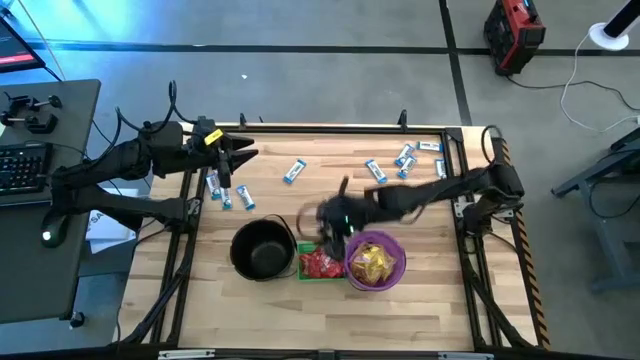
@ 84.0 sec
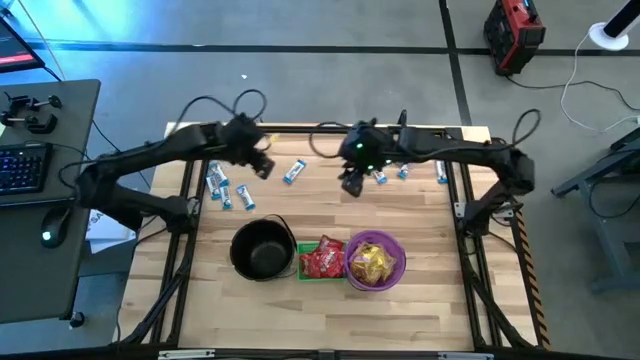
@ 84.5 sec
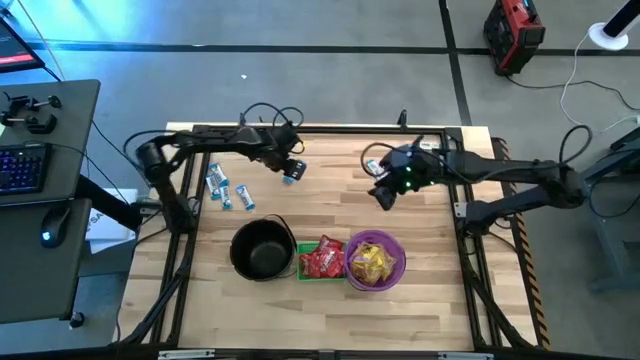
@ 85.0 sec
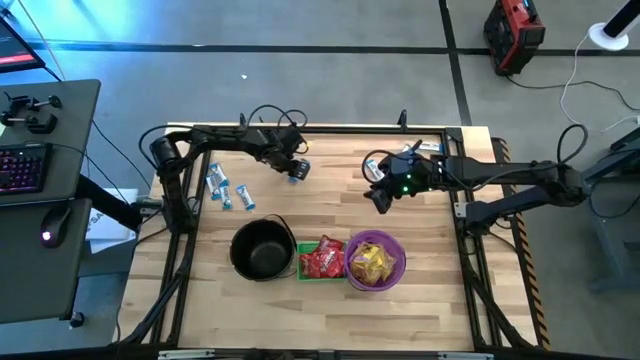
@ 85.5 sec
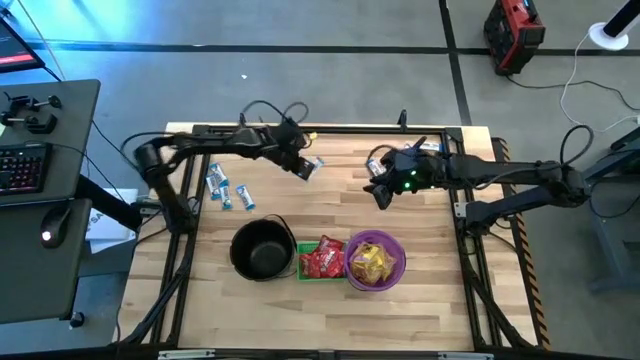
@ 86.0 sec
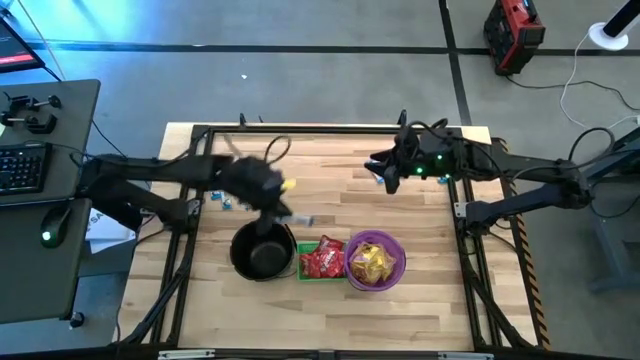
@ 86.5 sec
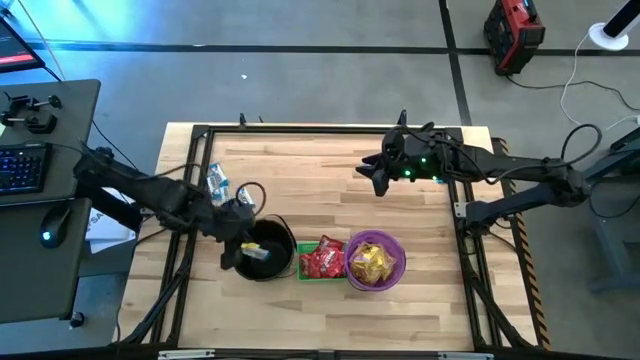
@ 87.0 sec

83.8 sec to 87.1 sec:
Task: Sort candy by brand, put in halloween buckets
Put the white chocolate into the black bucket

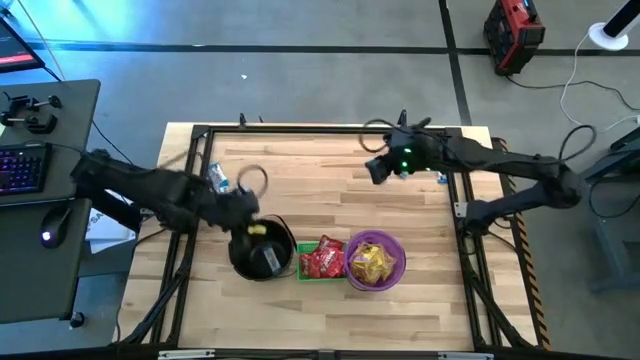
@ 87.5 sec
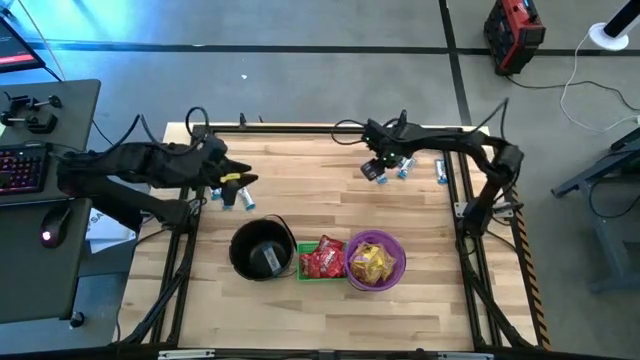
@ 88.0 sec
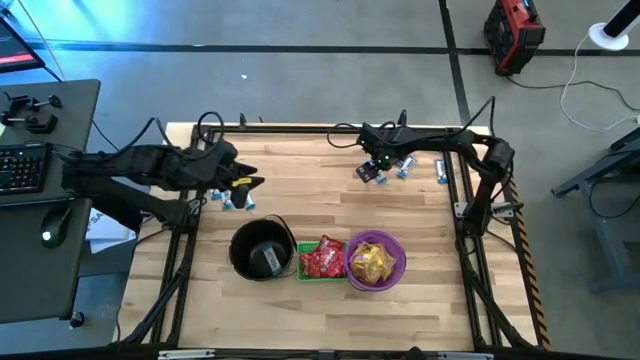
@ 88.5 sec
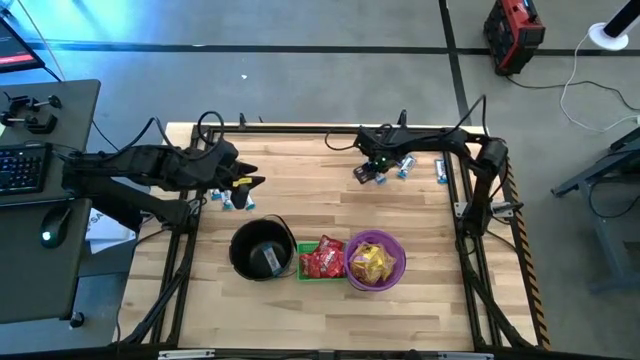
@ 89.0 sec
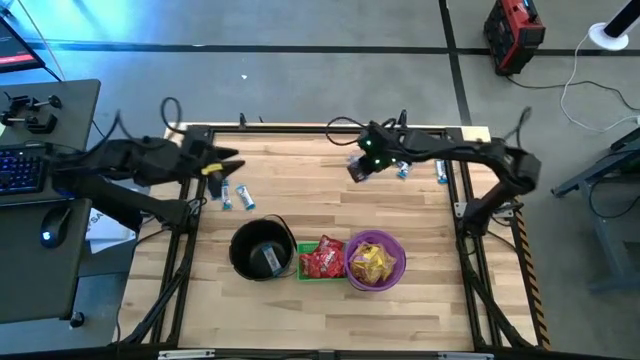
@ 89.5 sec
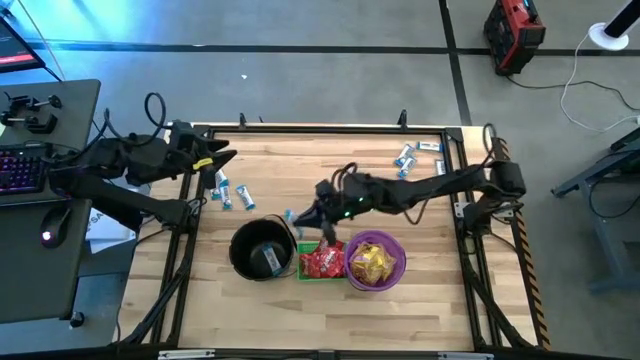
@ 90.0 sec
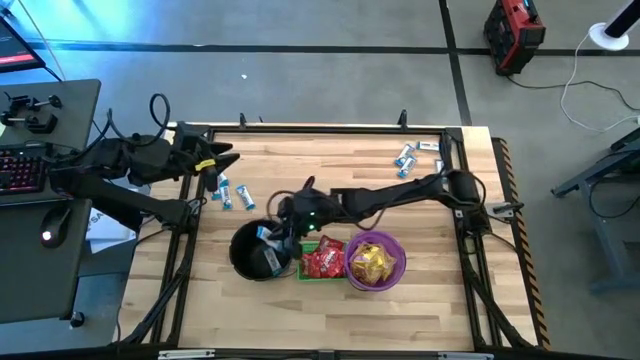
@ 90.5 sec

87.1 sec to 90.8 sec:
Put the white chocolate into the black bucket

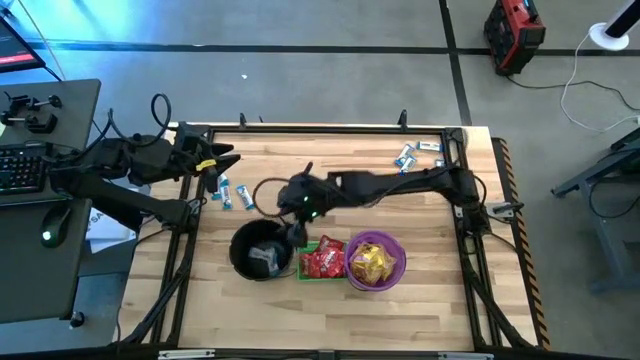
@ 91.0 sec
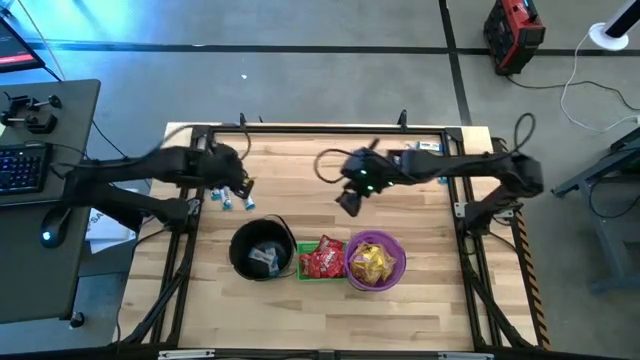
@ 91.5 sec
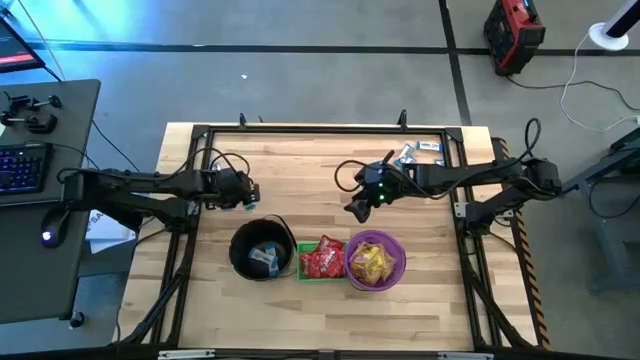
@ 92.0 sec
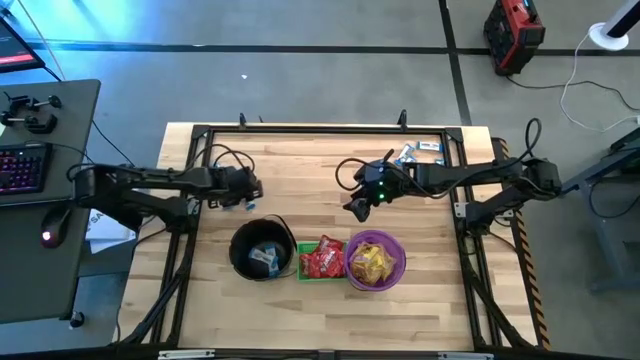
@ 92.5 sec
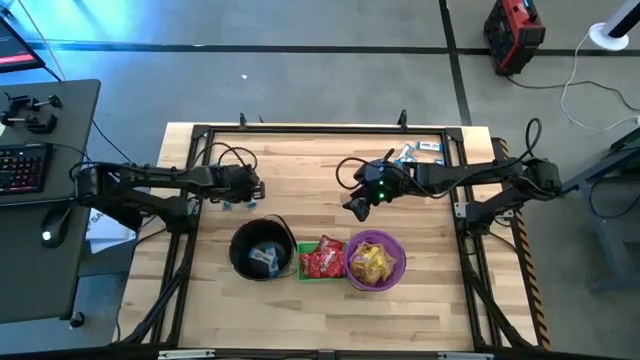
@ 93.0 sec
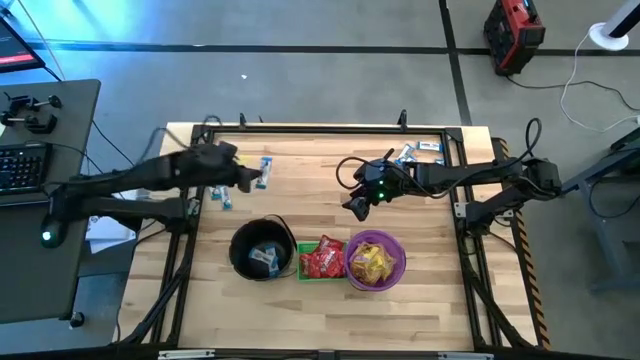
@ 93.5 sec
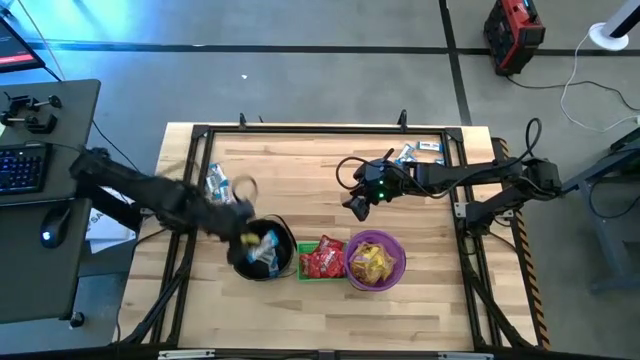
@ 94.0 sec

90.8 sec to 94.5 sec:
Put the white chocolate into the black bucket

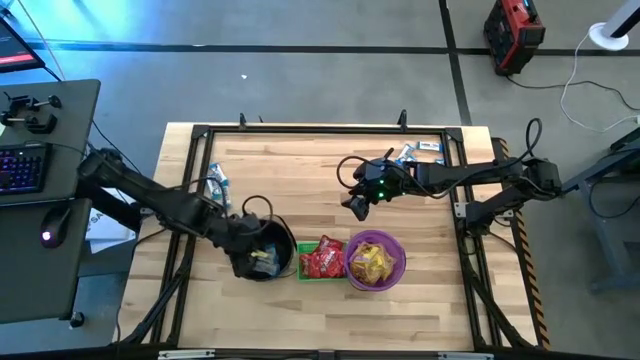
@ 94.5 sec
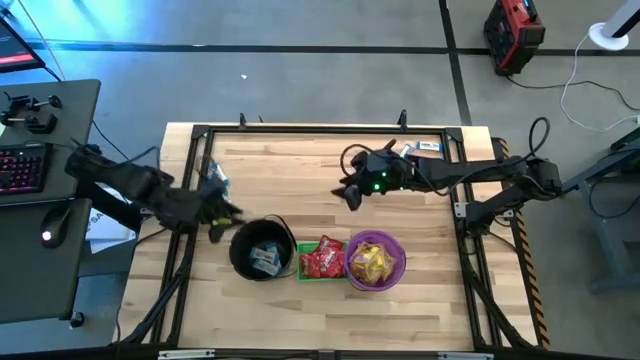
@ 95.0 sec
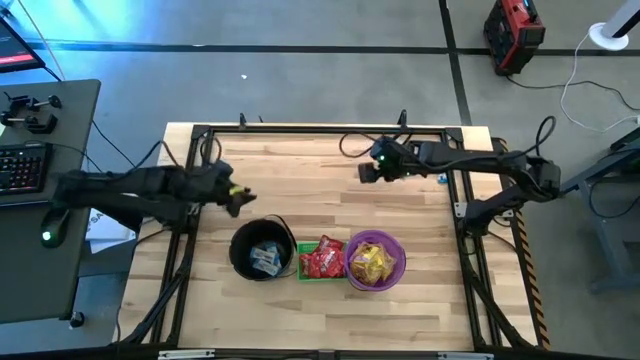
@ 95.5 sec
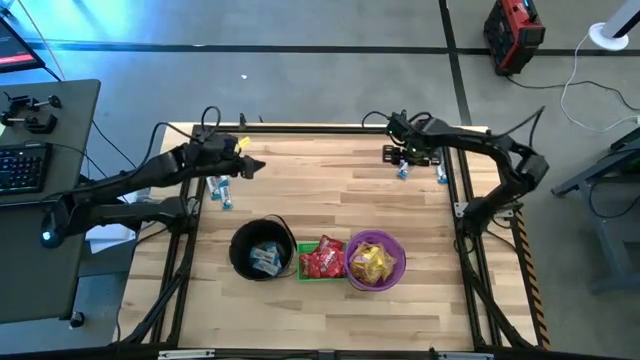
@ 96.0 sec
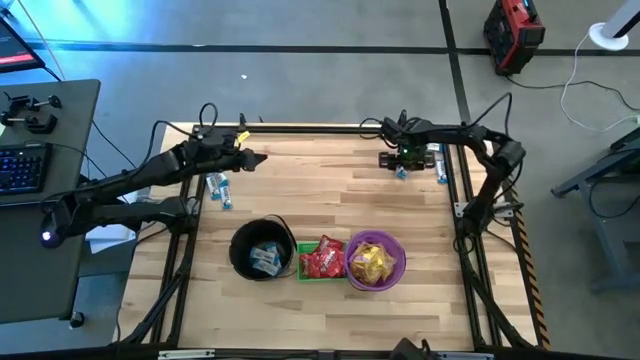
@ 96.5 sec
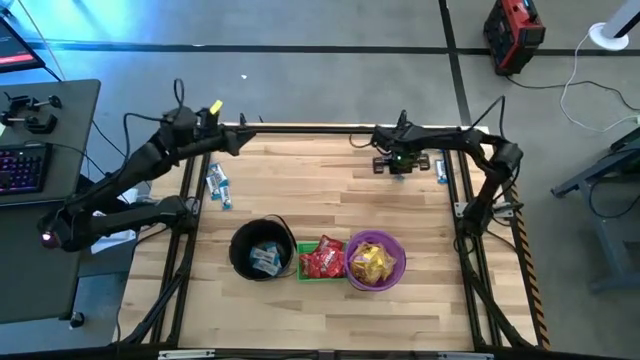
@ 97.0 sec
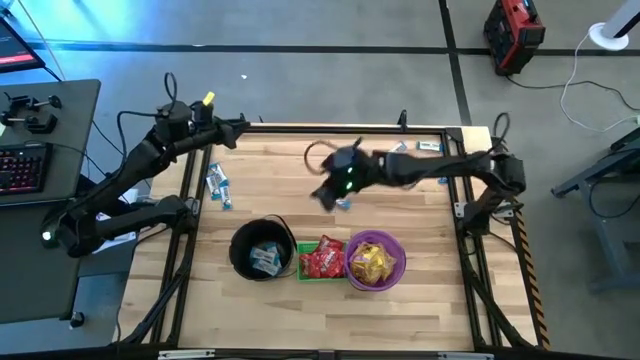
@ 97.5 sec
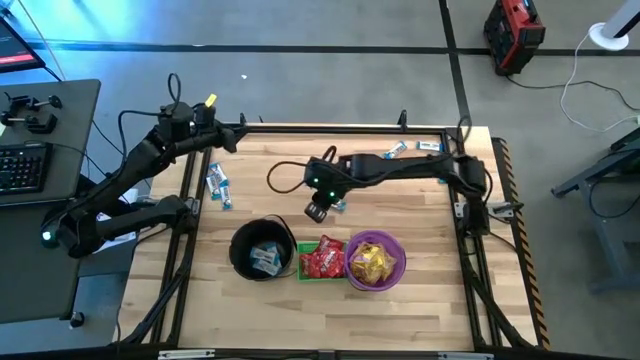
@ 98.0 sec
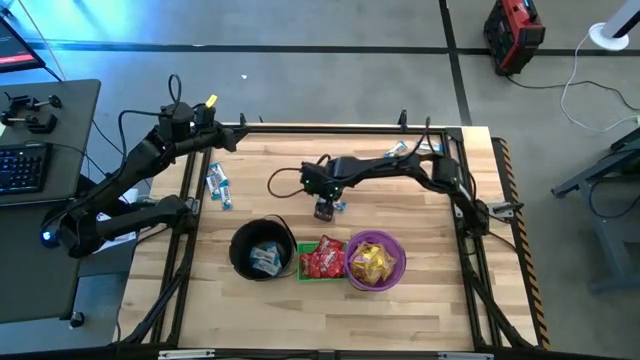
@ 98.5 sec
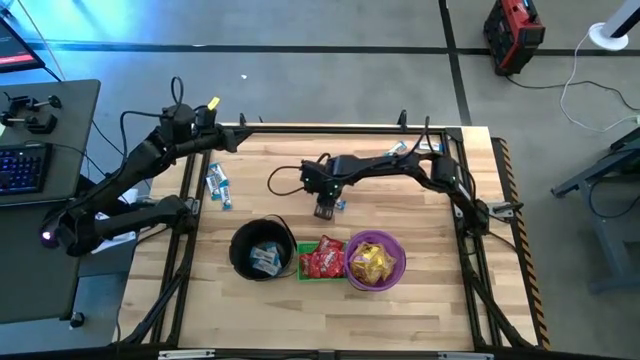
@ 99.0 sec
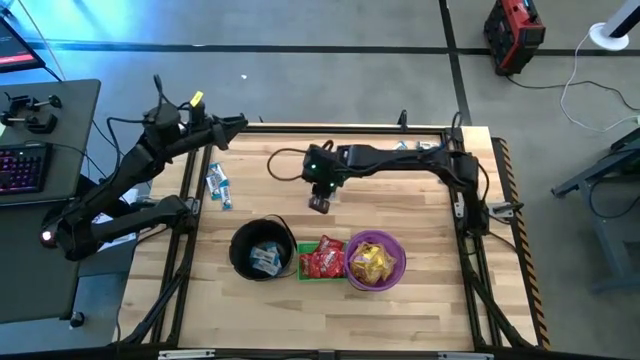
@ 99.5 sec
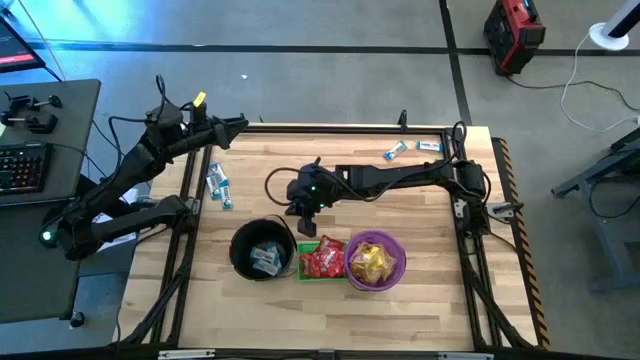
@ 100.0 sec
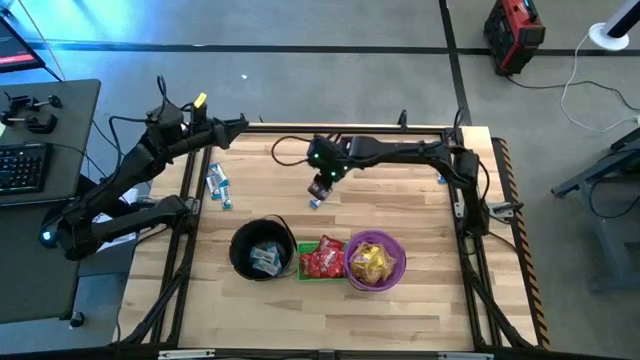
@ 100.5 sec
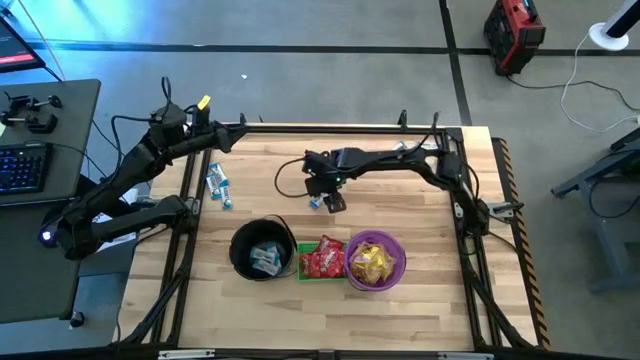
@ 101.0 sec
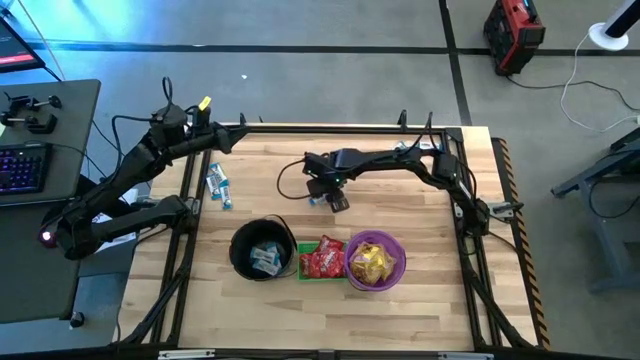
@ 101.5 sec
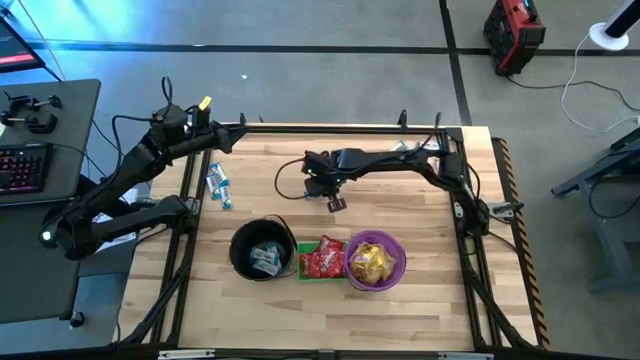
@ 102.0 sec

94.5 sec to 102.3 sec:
Put the white chocolate into the black bucket

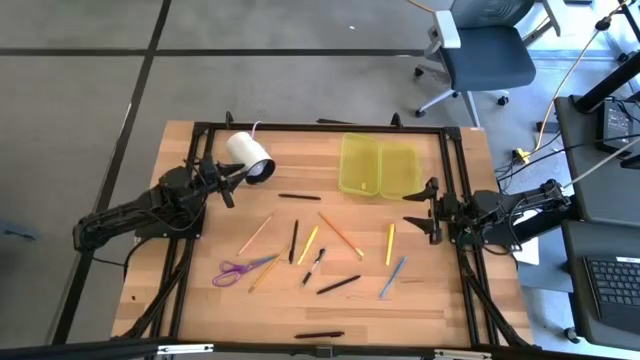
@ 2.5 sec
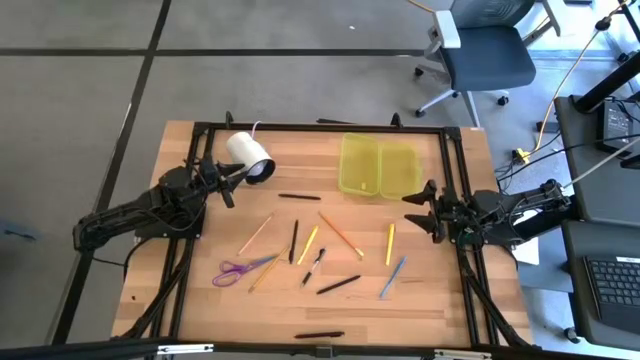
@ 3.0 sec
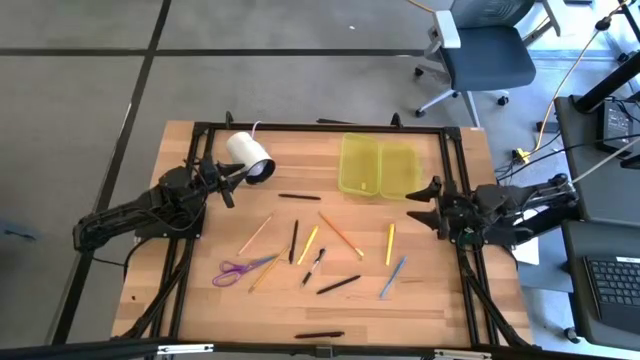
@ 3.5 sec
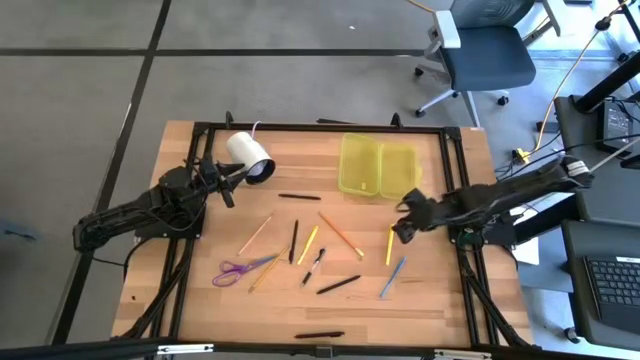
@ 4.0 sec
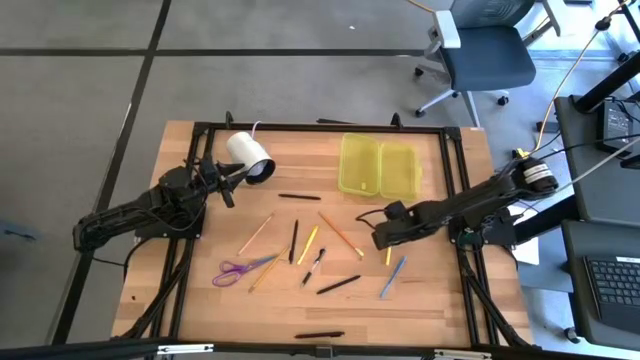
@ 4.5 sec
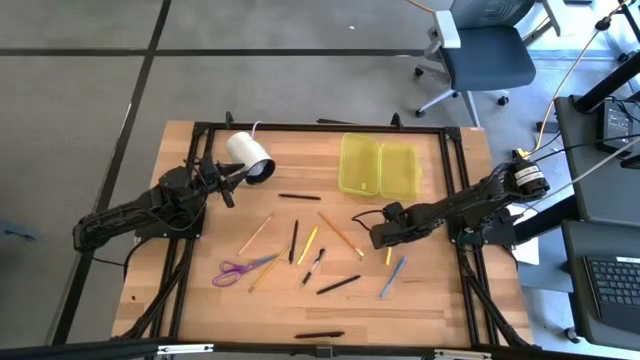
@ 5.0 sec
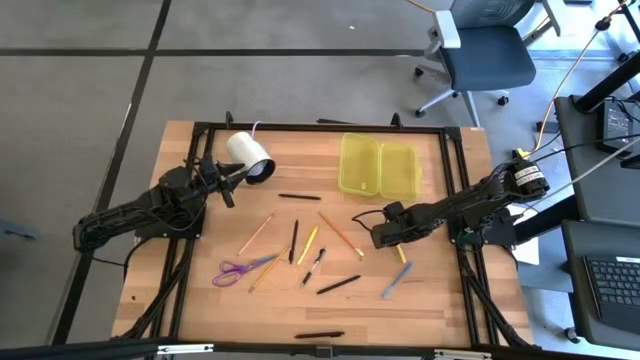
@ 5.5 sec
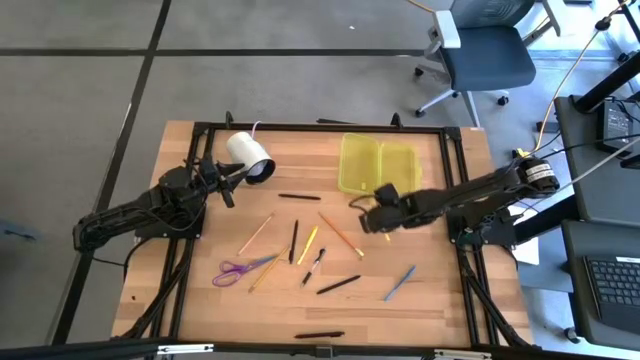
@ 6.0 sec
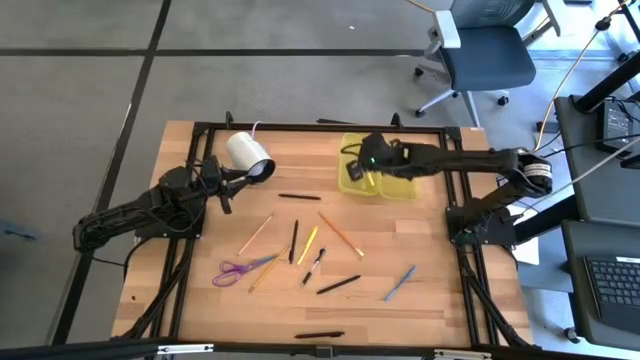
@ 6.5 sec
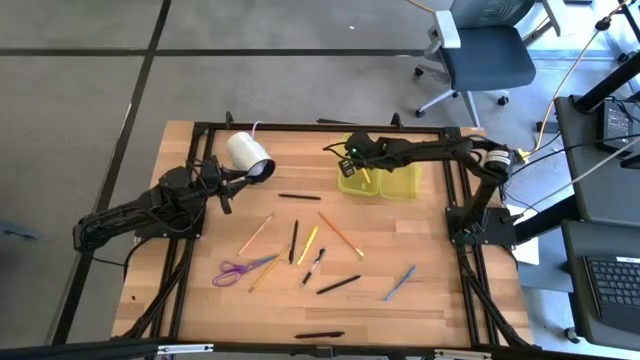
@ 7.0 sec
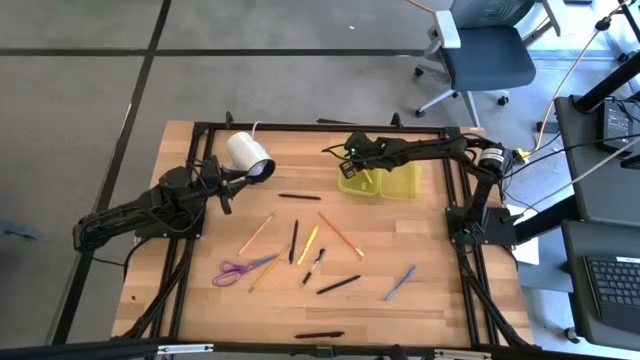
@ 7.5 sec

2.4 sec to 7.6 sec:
Task: Pick & place school supplies into a supply box
Put the yellow pen into the yellow supply box
